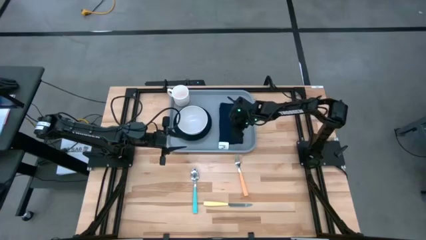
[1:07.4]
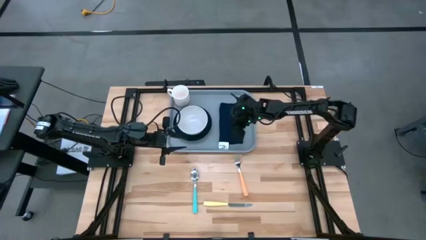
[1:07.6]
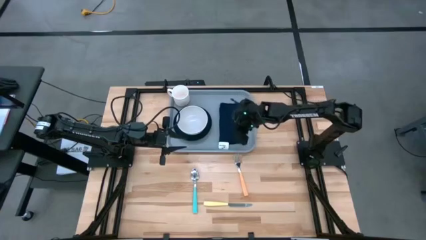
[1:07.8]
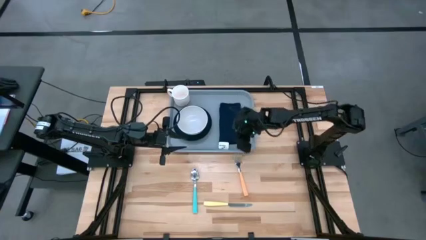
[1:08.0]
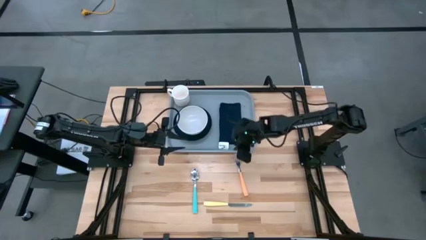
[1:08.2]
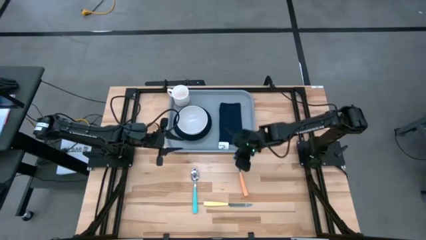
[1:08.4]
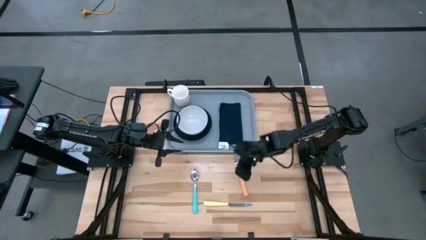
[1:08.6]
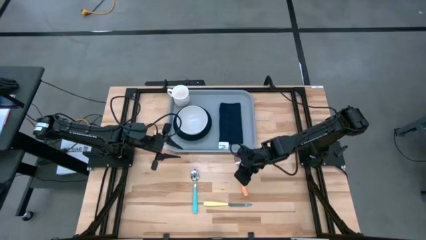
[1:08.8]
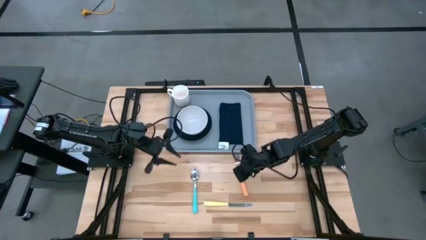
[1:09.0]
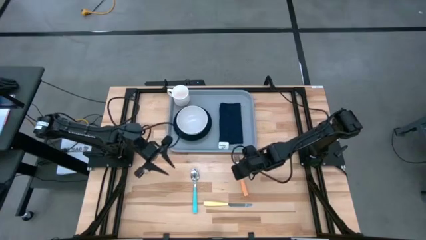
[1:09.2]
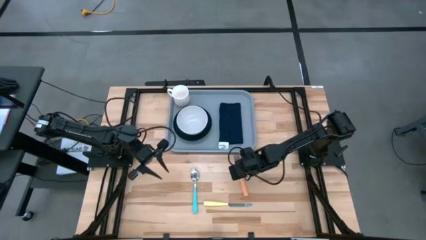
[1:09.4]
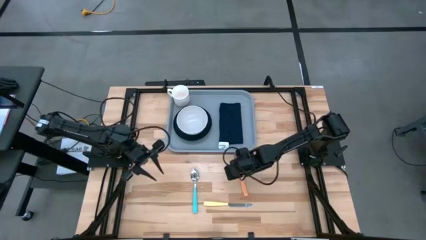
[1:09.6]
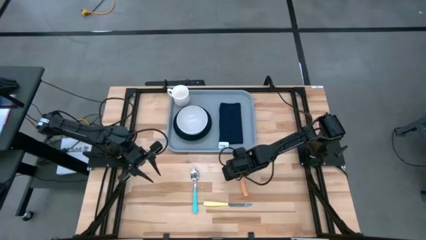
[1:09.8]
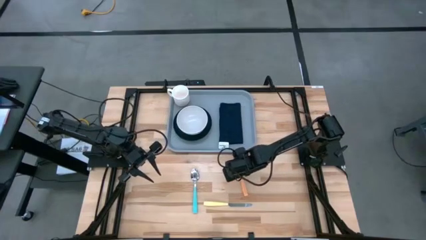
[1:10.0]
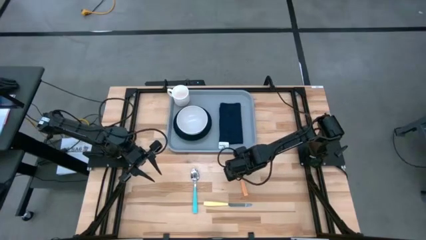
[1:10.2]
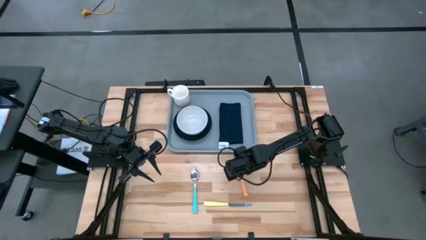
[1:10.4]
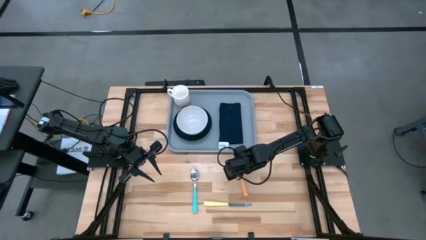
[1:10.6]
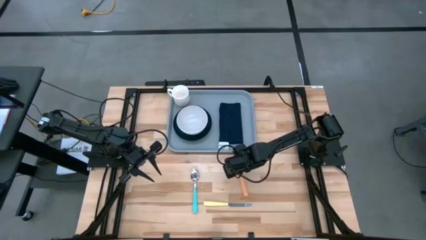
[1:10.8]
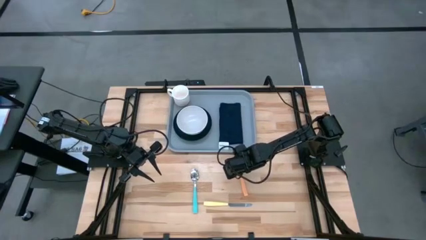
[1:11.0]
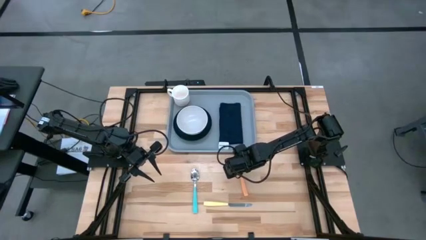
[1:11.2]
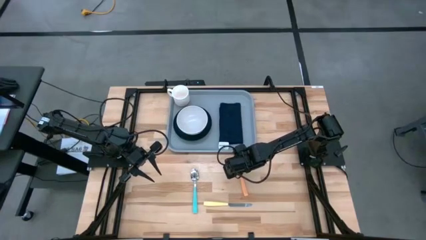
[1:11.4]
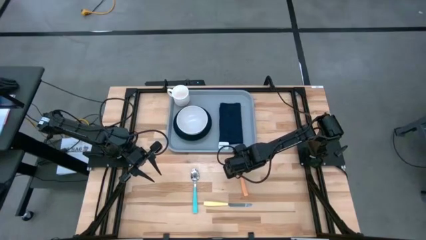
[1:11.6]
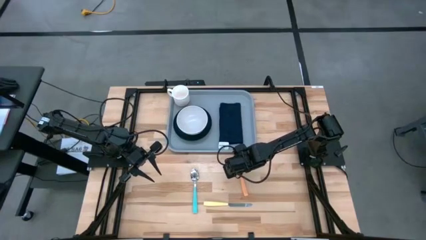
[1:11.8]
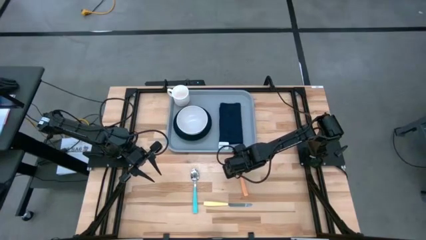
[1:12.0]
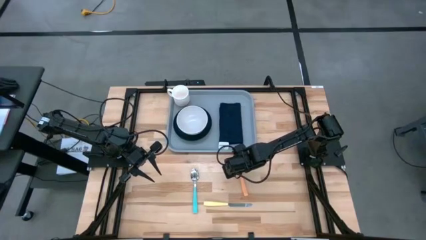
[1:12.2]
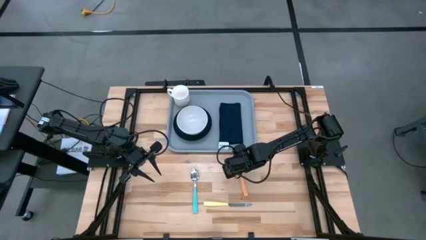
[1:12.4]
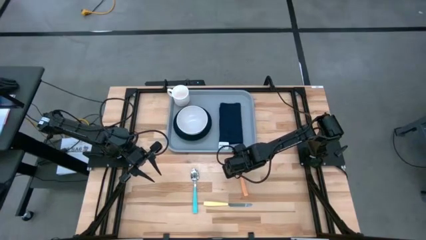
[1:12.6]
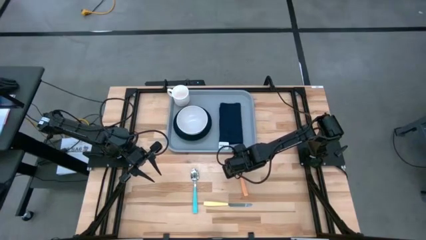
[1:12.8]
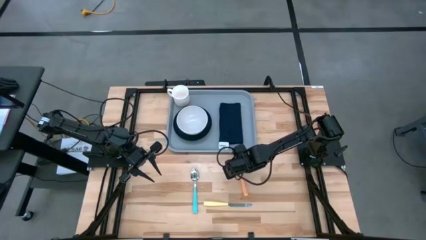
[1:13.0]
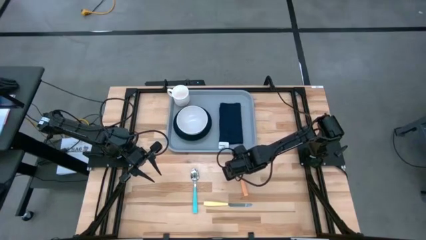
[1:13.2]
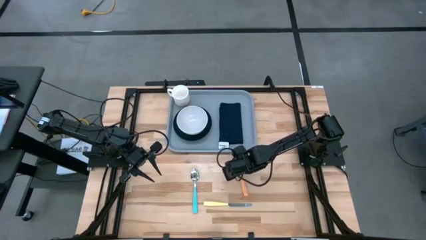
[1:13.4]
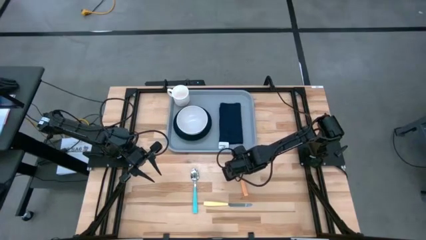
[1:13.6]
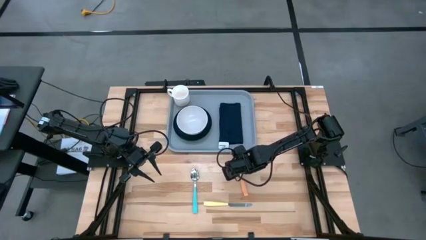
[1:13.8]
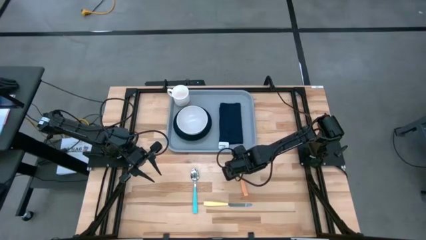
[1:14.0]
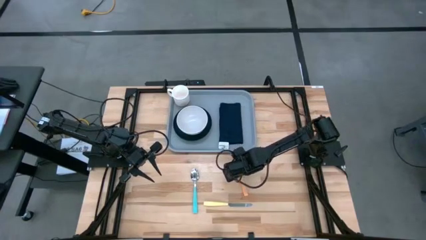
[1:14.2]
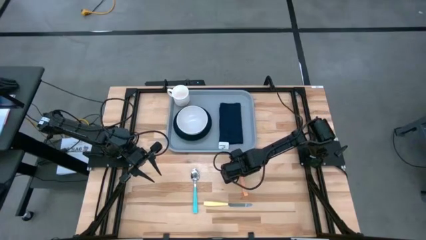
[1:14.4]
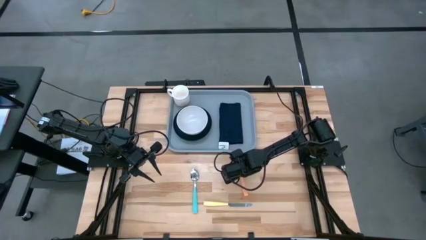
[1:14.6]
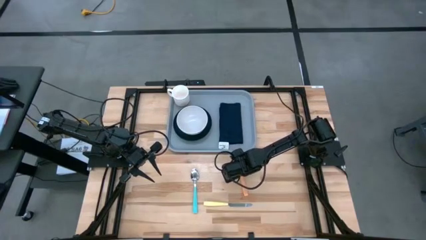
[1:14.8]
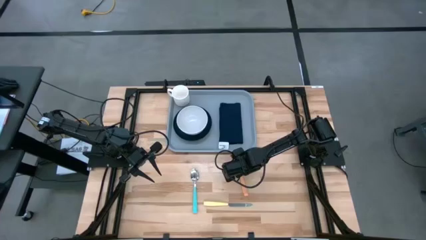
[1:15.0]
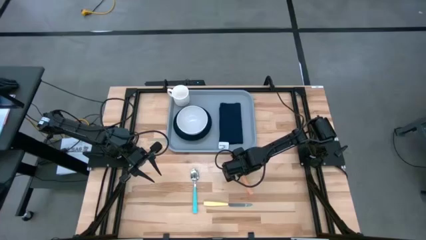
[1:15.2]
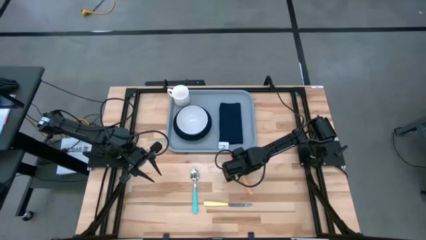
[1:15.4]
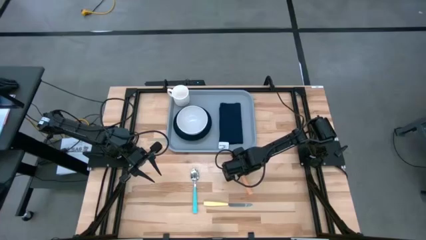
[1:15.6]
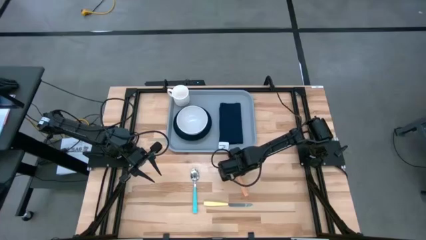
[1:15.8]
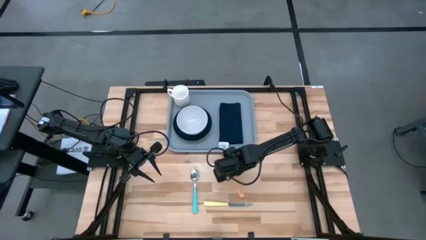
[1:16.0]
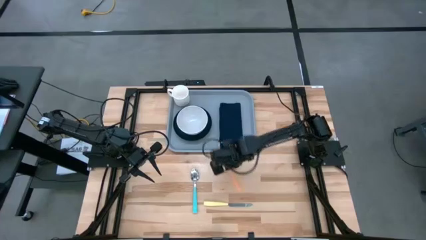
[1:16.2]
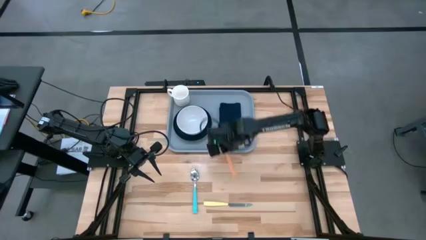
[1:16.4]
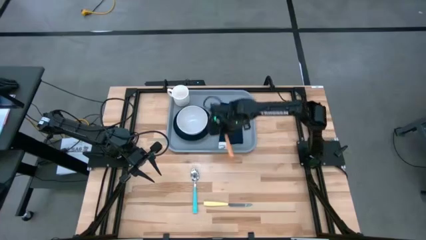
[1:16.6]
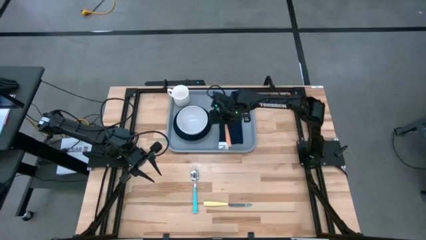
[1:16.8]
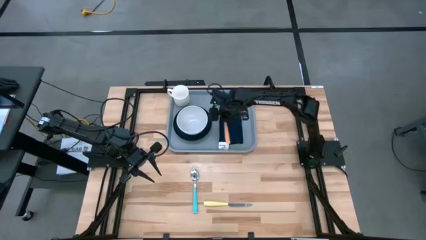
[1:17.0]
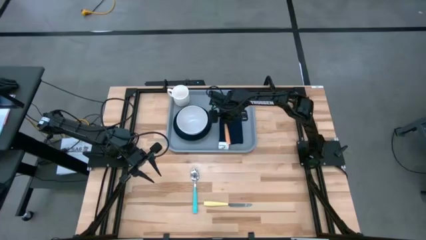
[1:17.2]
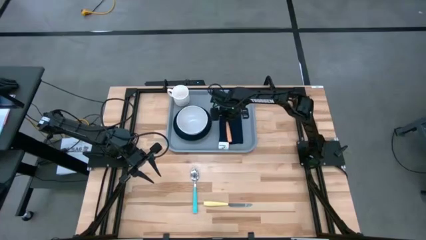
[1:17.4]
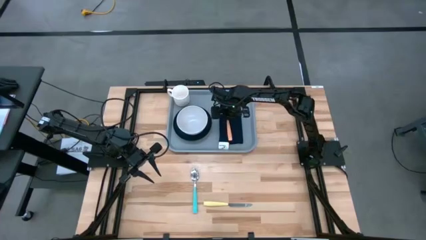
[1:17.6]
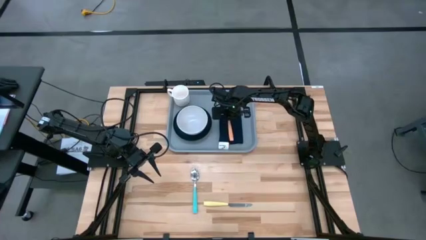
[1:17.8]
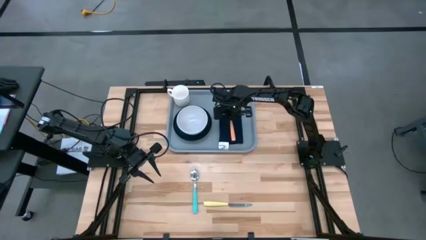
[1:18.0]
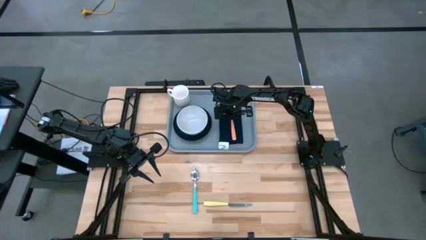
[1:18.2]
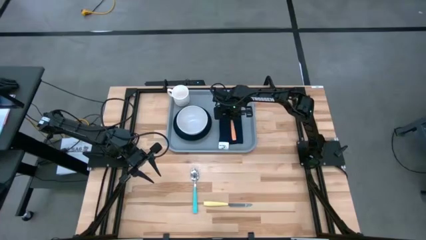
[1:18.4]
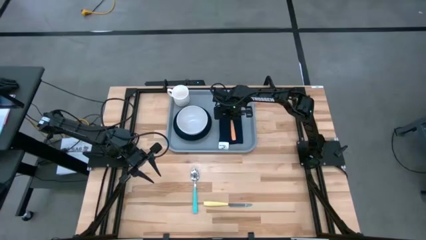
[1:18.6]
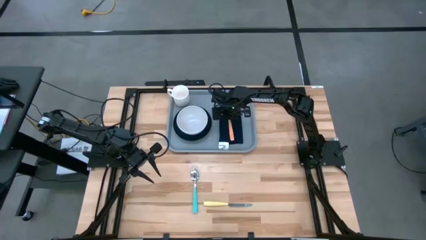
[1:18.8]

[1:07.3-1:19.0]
Task: Set up tray
Put the orange fork on the blue napkin

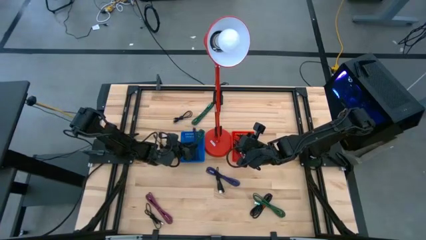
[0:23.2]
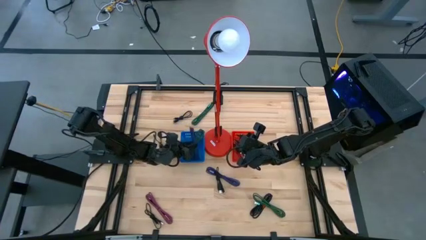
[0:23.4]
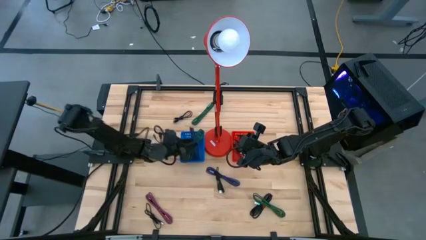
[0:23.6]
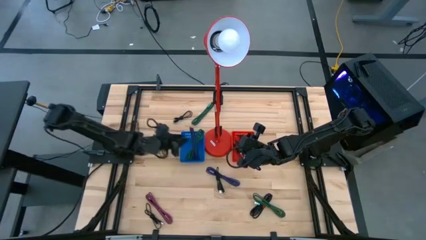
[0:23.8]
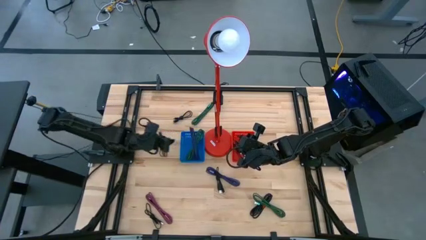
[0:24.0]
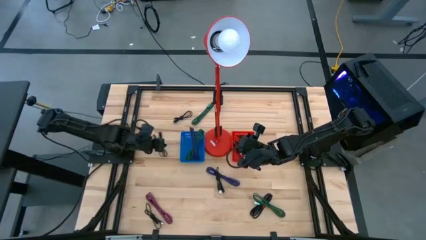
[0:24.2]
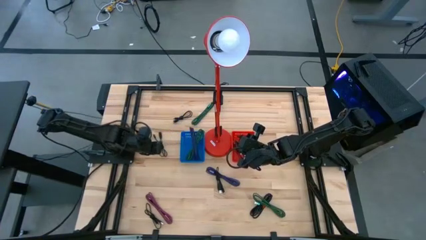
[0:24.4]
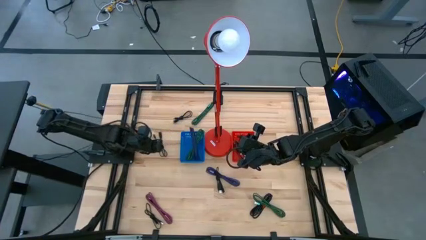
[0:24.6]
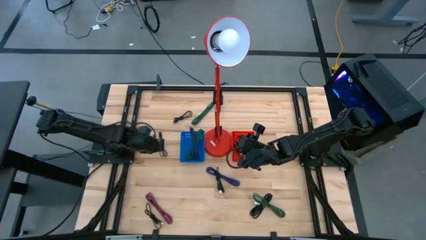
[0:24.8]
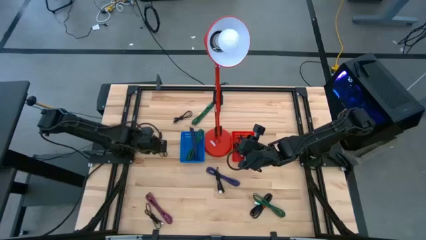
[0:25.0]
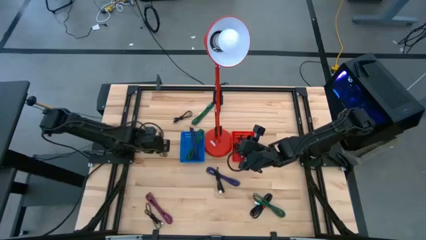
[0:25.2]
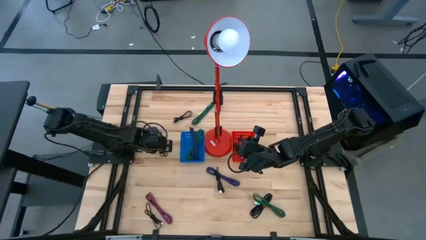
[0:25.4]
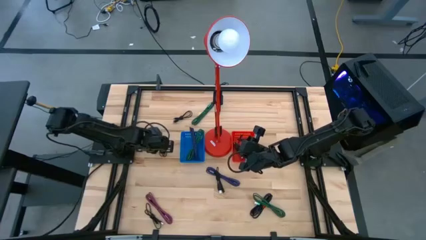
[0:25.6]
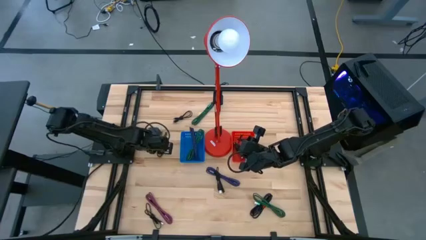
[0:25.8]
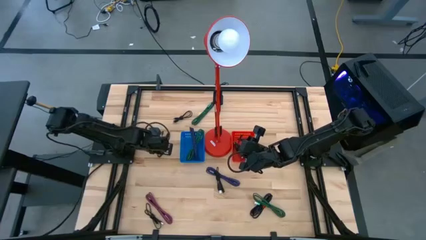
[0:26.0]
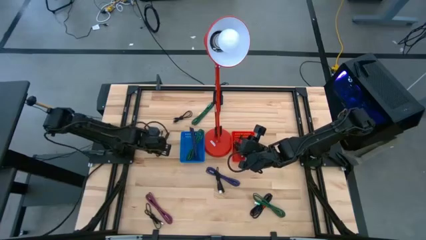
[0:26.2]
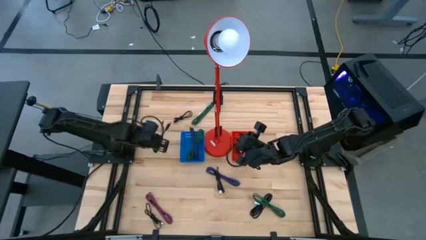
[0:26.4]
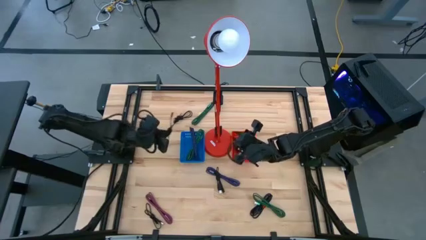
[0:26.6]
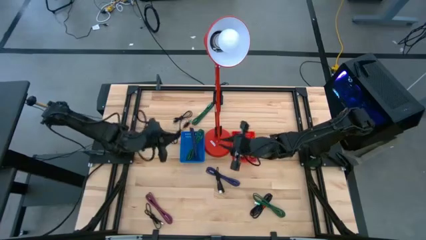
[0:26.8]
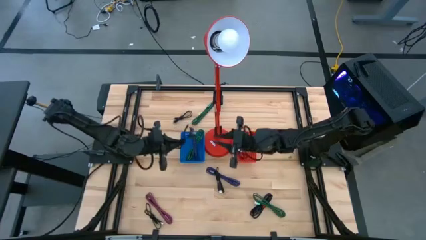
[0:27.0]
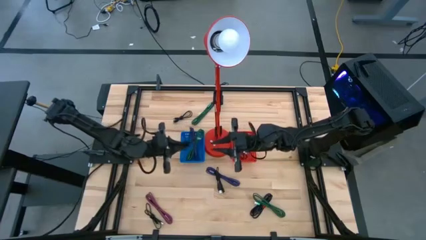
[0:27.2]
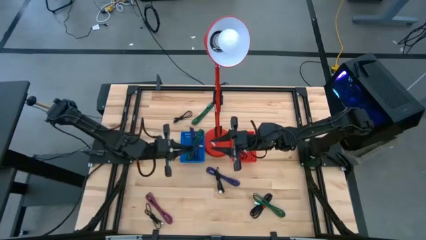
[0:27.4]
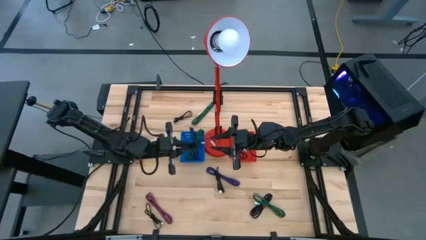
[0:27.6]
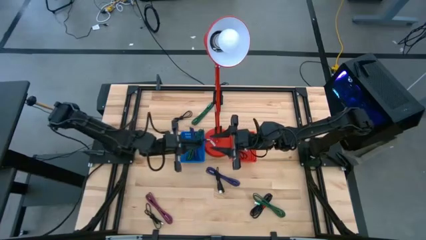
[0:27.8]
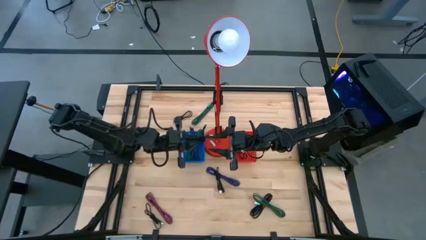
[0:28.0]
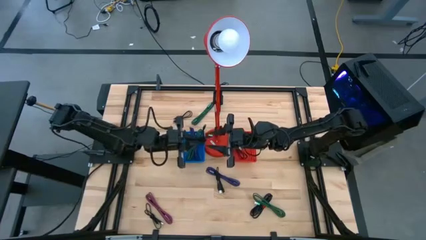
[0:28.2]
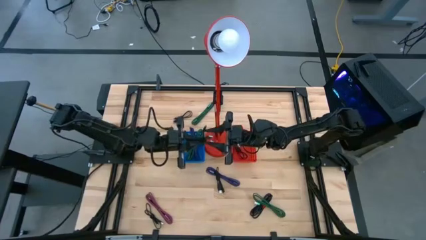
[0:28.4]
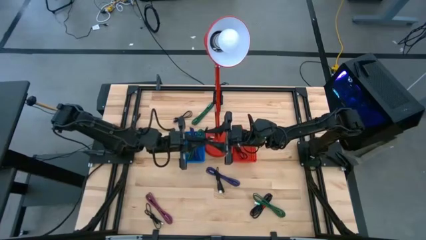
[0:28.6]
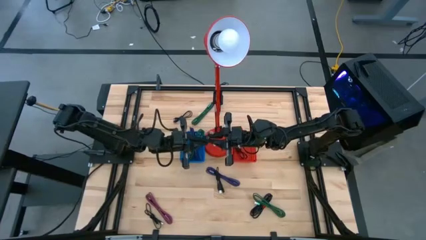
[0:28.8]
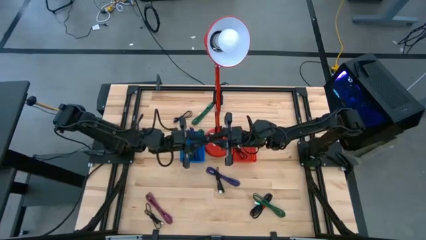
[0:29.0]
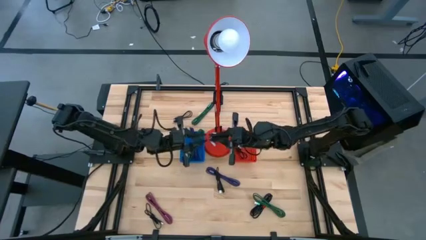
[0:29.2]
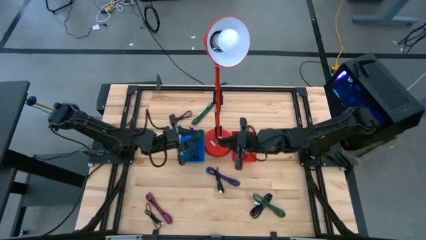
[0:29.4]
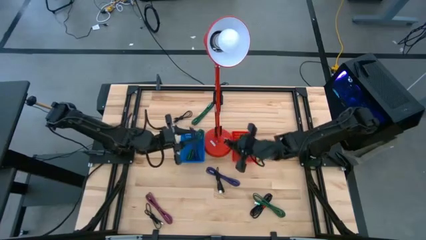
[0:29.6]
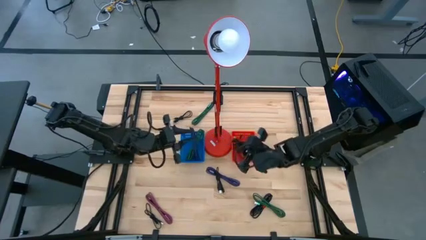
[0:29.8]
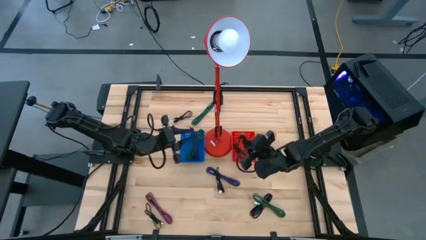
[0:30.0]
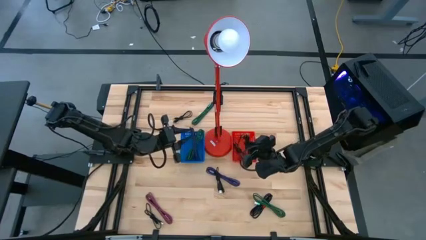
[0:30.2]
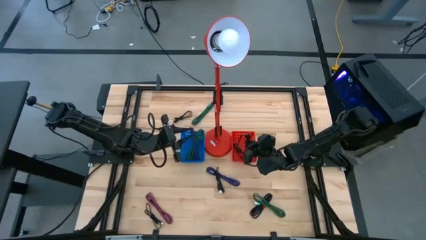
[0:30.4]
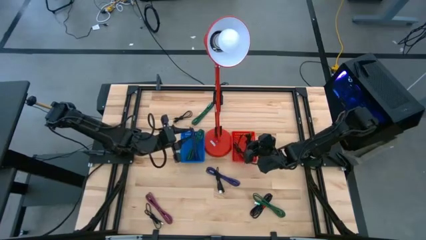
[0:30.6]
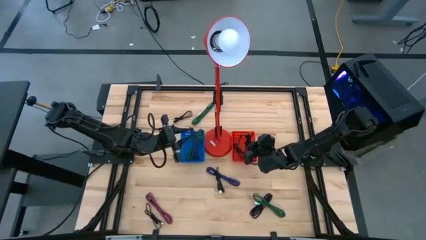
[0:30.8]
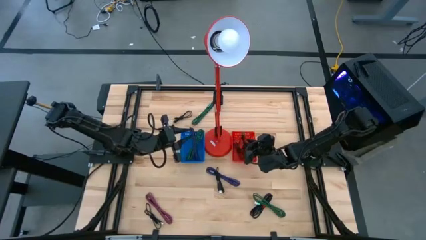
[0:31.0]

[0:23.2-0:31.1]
Task: Pick & Place USB Port
Put the black charger cable into the orange bin
